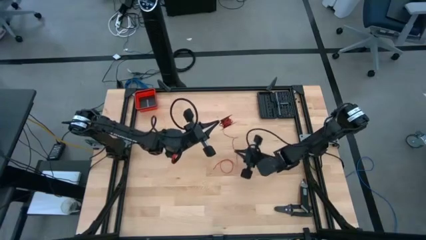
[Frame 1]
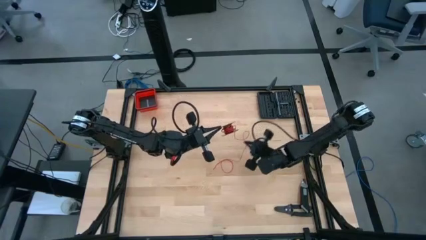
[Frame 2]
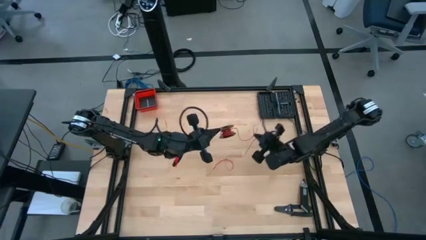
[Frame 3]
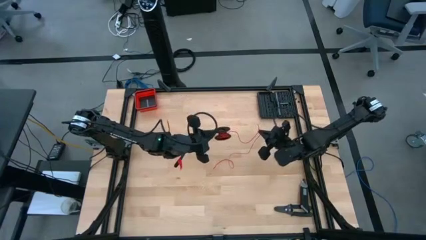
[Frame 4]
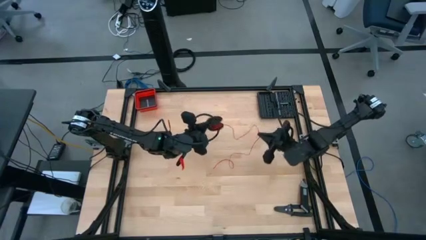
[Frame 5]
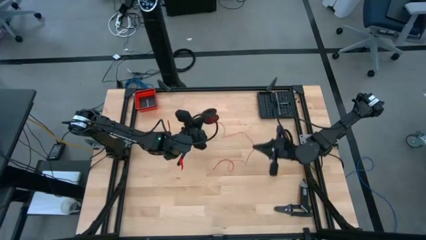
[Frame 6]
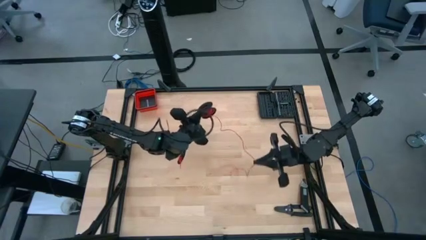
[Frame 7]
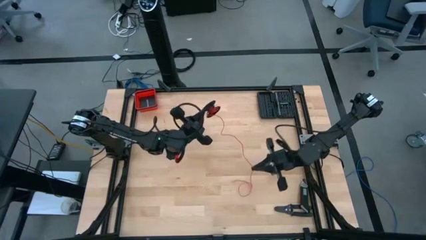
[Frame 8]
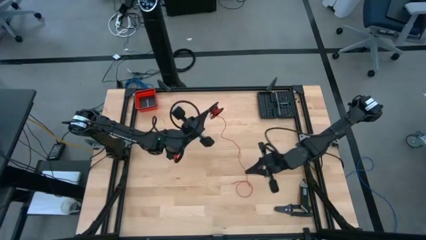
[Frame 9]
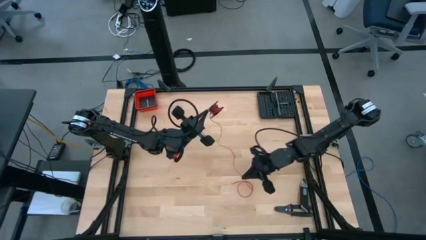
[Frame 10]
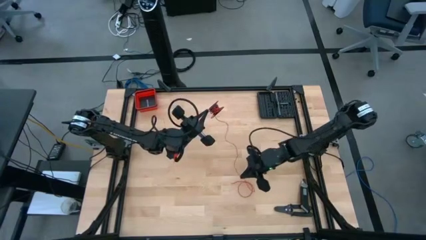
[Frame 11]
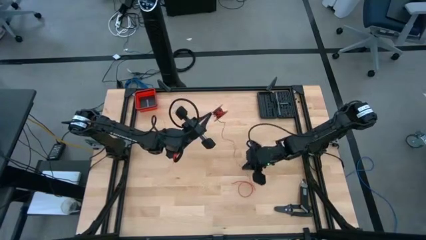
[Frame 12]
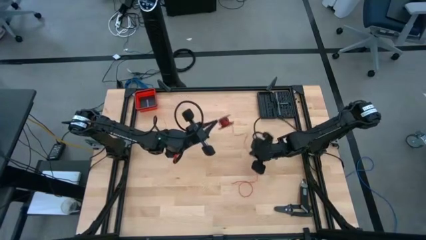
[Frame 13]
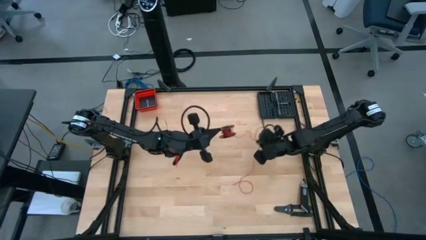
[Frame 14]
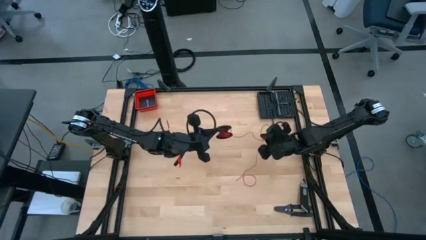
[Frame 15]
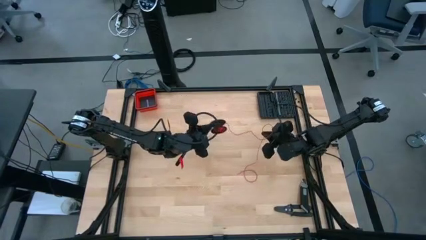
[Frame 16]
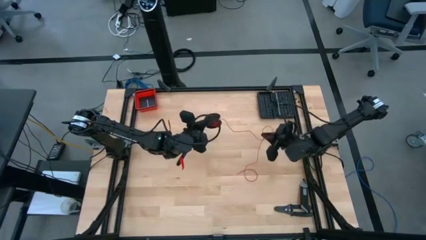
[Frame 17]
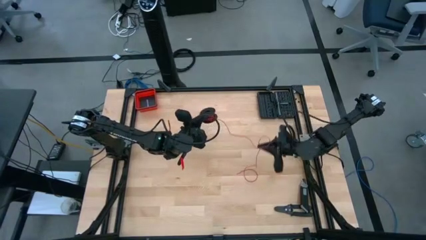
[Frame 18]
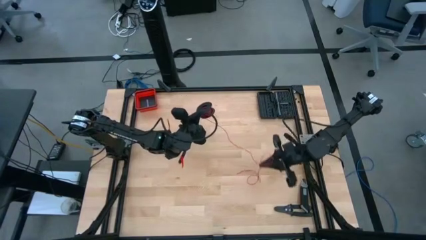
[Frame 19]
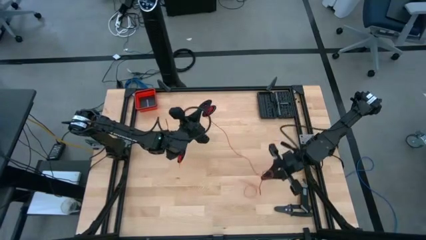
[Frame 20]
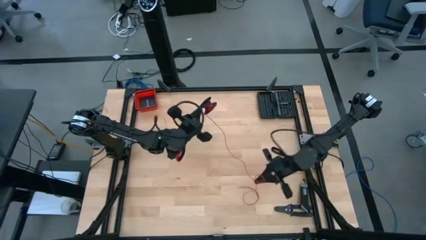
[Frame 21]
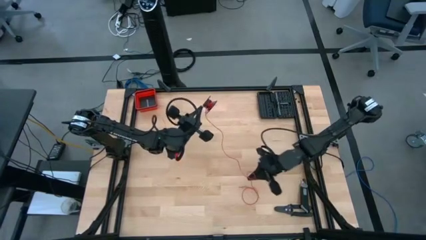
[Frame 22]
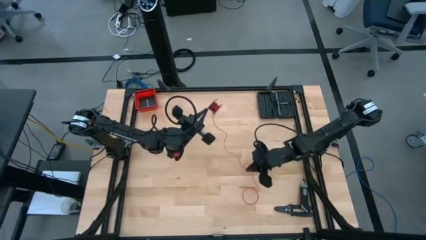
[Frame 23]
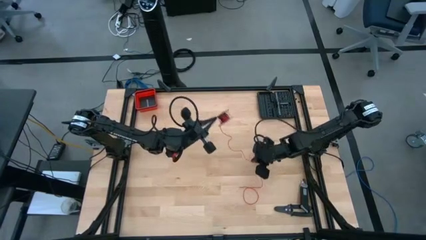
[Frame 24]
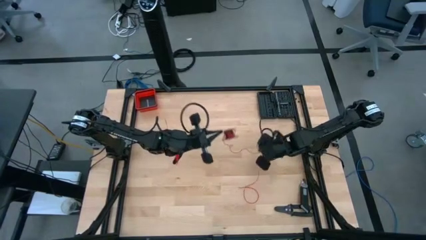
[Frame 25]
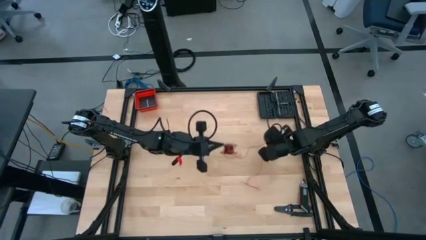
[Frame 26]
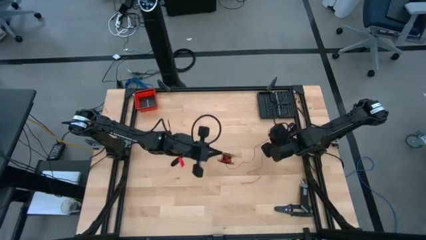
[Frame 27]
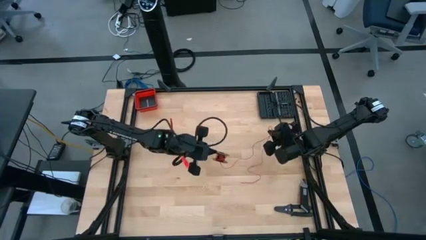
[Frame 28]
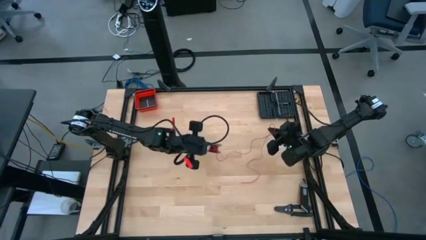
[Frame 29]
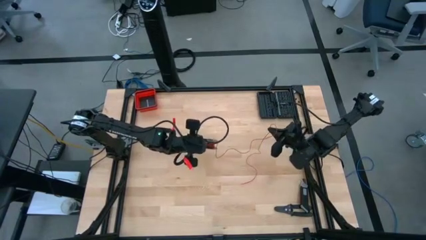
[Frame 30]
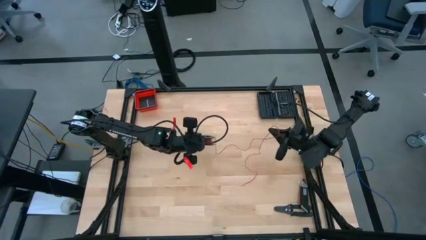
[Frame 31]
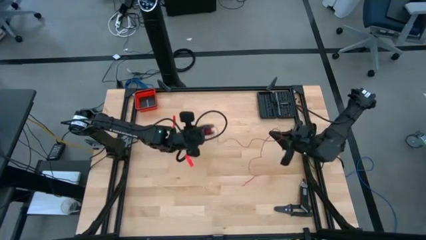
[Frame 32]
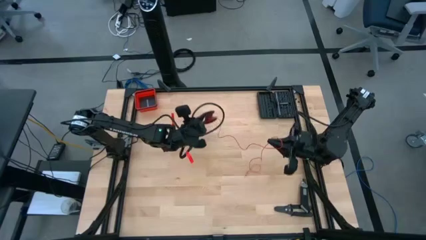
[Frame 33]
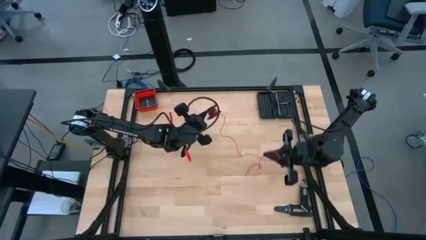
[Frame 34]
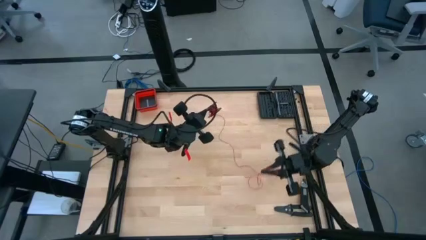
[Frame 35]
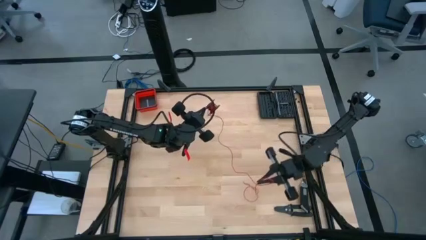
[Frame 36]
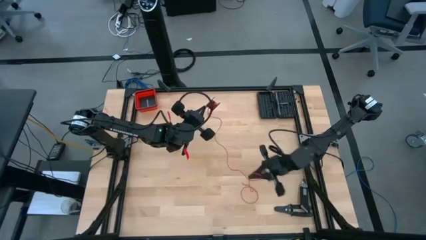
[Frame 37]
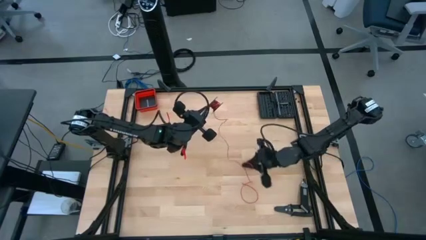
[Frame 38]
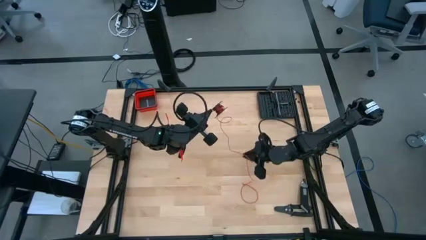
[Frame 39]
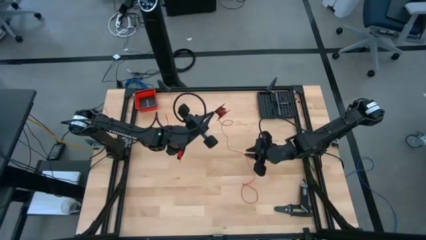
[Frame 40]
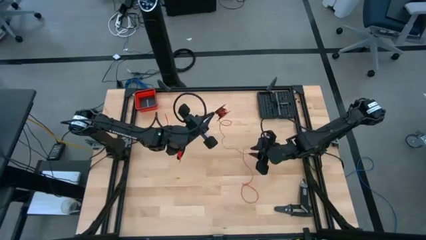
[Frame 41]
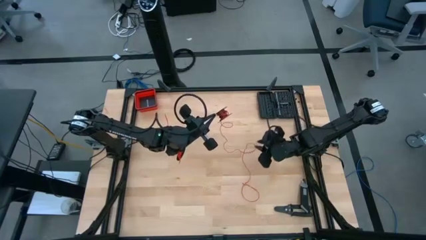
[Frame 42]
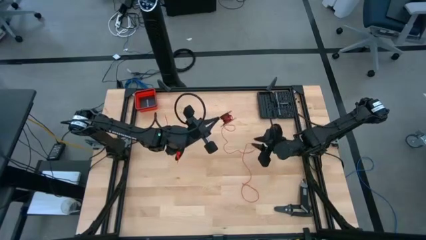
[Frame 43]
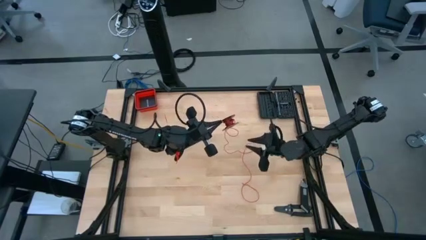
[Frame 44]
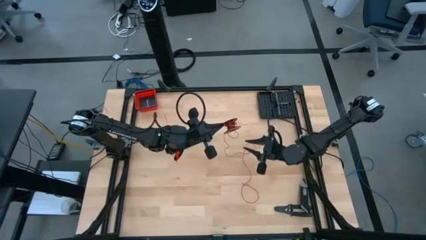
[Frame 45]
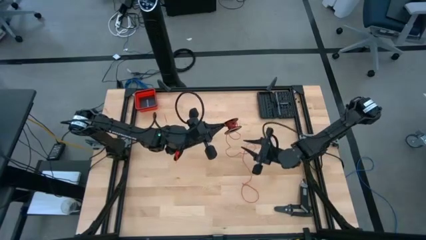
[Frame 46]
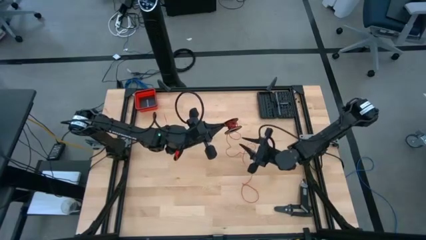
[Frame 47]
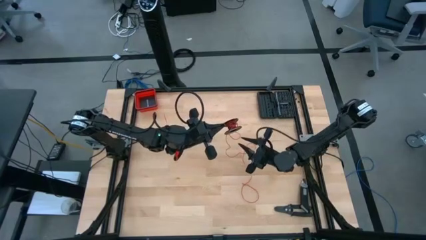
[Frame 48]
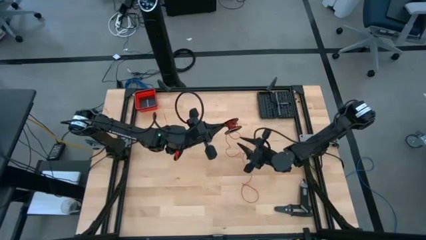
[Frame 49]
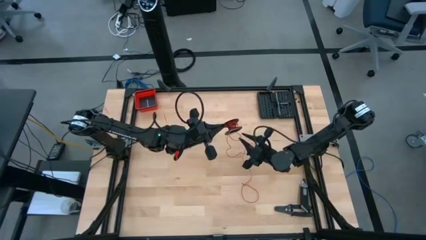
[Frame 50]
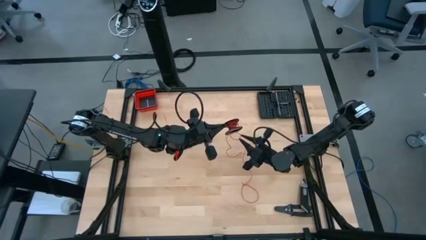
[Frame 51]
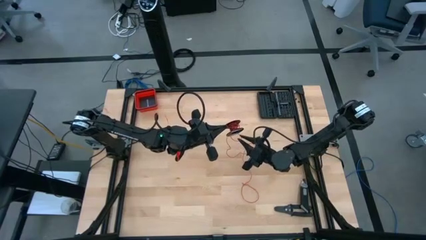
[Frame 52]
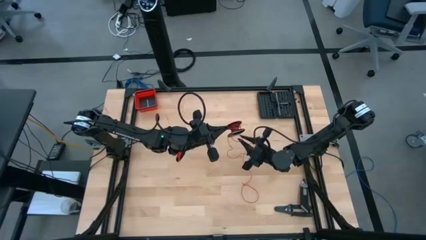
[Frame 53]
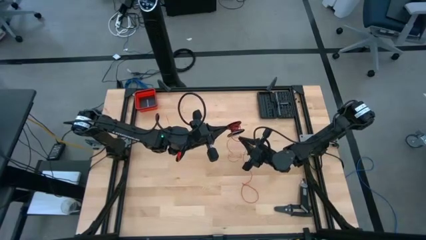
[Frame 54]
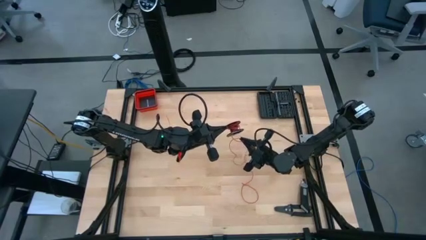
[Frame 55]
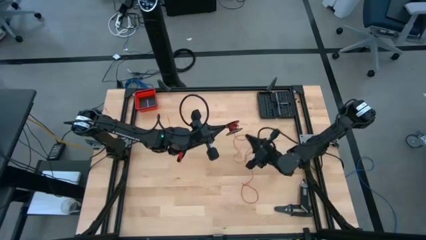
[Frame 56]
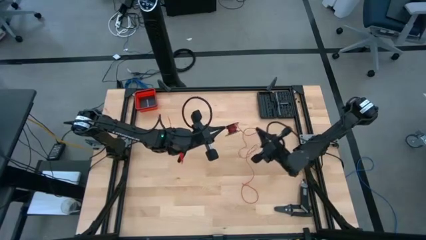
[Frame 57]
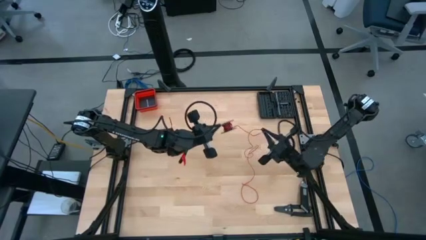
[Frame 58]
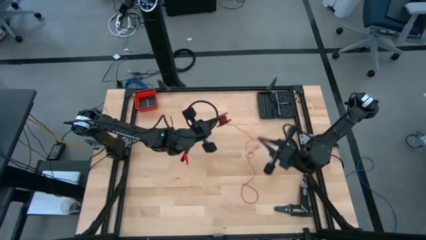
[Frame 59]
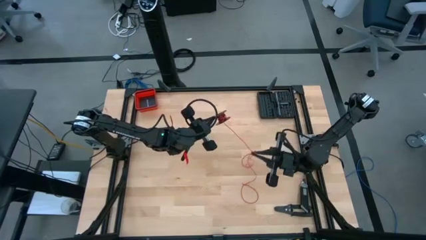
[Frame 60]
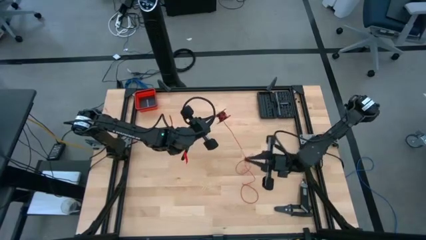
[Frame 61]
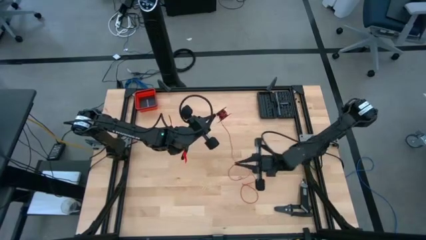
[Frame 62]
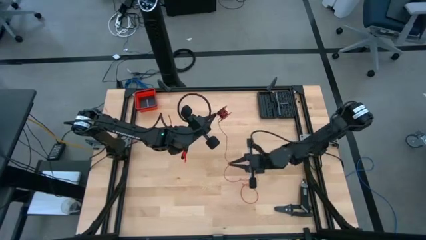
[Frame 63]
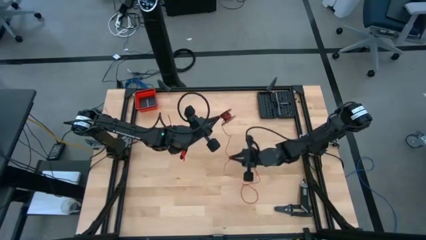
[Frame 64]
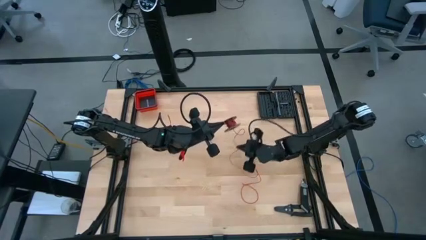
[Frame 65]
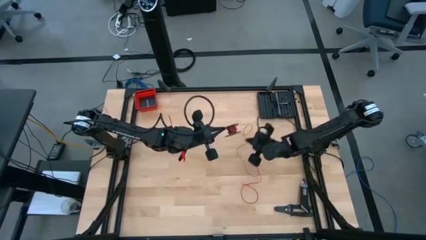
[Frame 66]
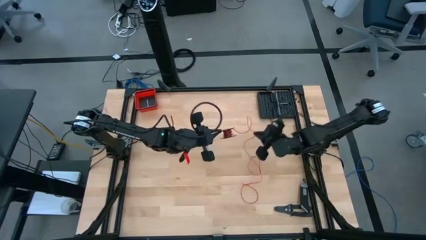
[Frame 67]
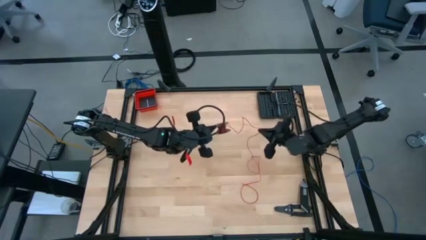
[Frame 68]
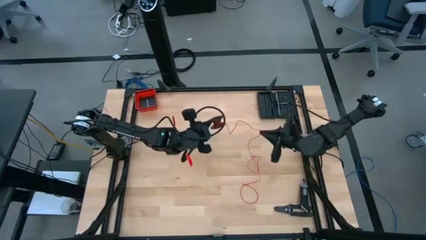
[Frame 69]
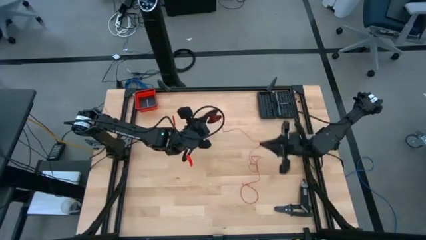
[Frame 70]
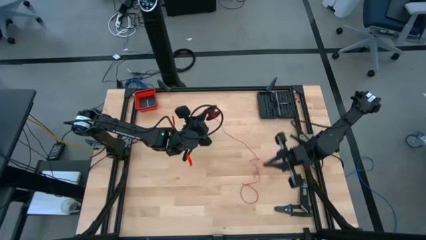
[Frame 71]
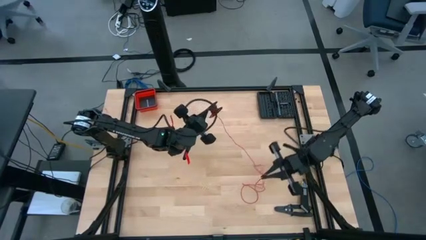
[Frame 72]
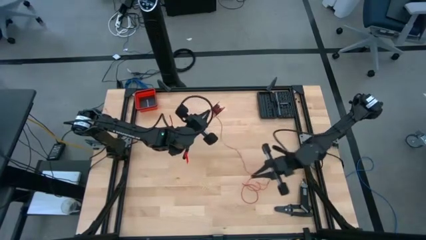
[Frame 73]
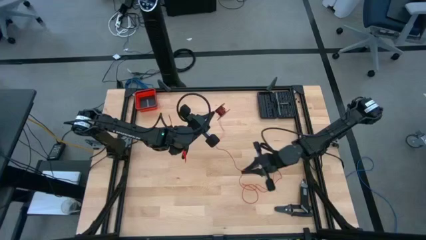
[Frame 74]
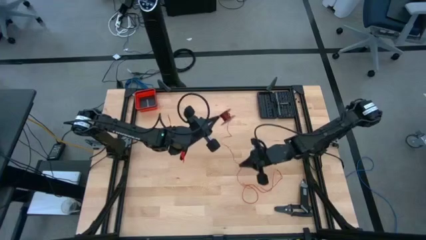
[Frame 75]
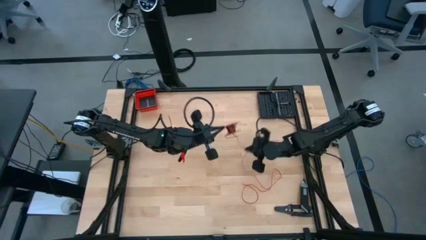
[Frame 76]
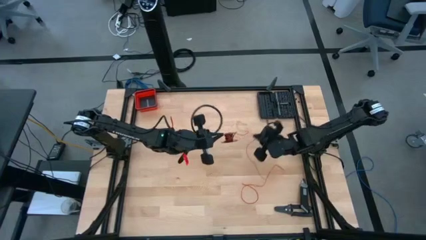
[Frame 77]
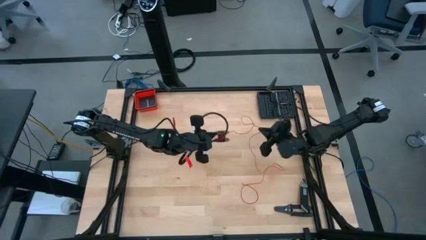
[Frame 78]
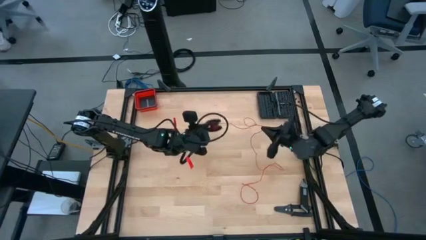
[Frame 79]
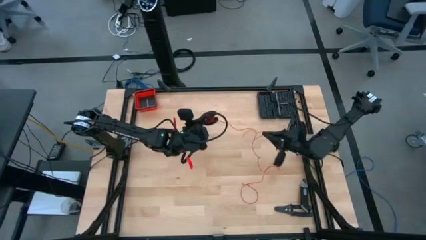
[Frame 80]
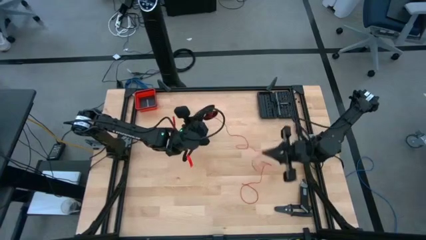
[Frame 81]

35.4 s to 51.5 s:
Task: Coil cords
Uncoil the red wire from the spool
